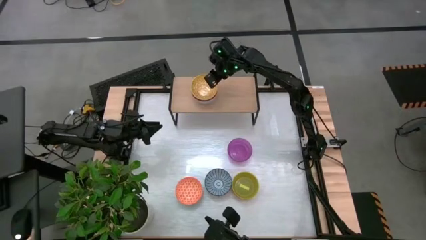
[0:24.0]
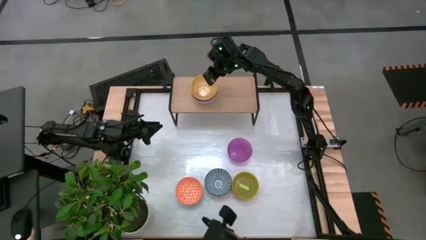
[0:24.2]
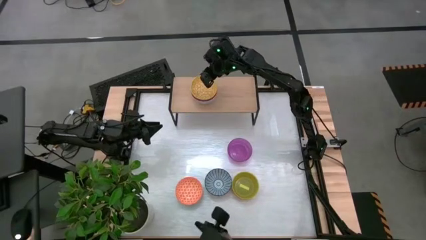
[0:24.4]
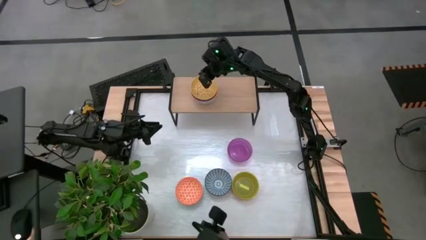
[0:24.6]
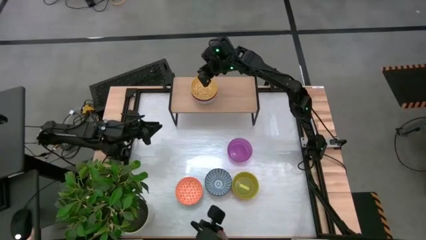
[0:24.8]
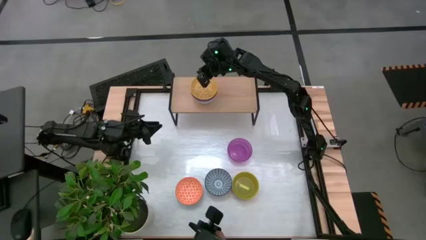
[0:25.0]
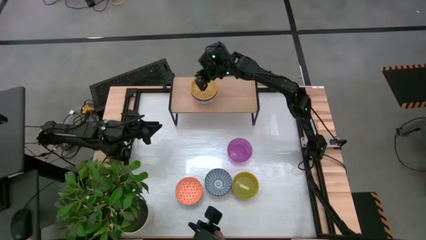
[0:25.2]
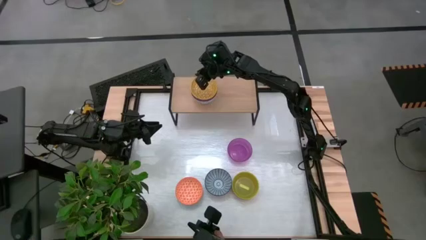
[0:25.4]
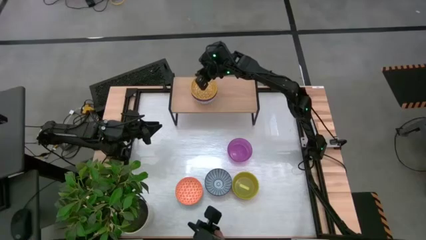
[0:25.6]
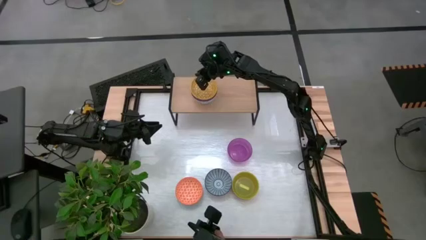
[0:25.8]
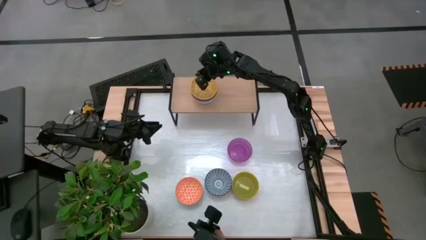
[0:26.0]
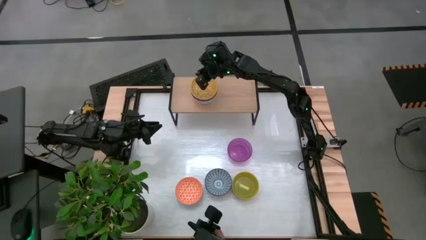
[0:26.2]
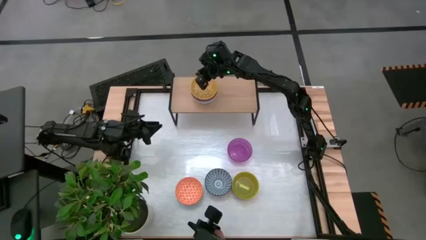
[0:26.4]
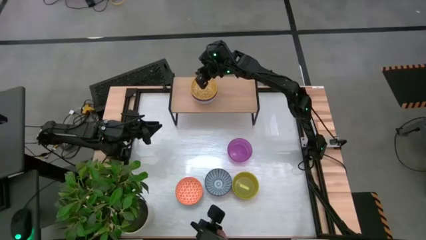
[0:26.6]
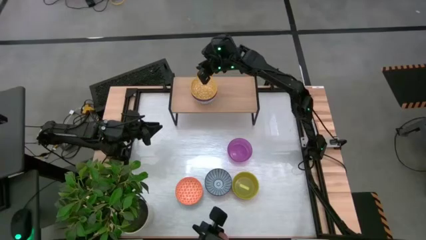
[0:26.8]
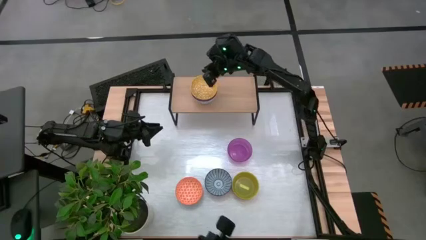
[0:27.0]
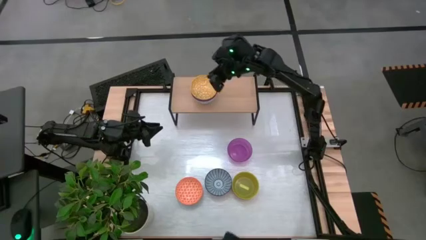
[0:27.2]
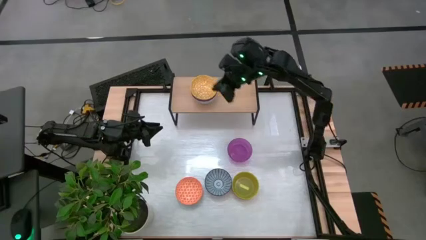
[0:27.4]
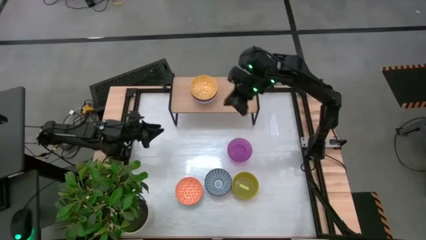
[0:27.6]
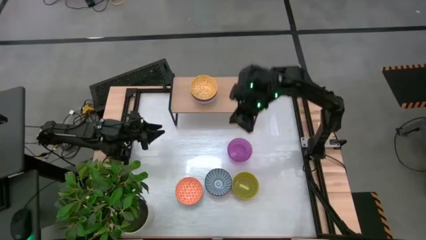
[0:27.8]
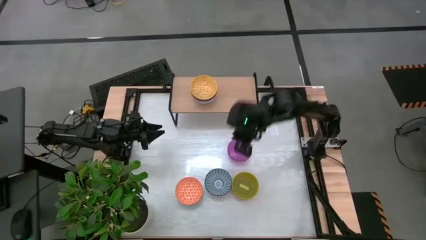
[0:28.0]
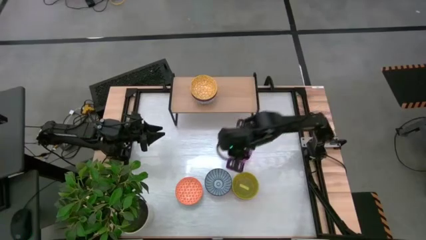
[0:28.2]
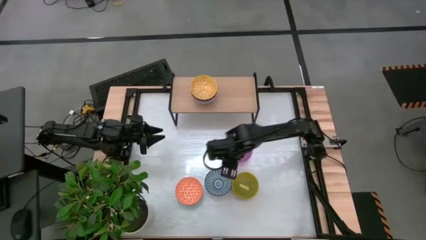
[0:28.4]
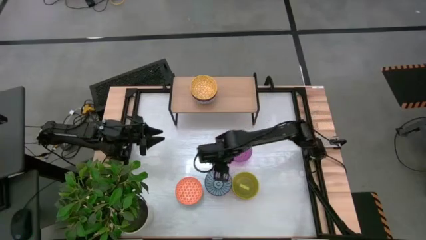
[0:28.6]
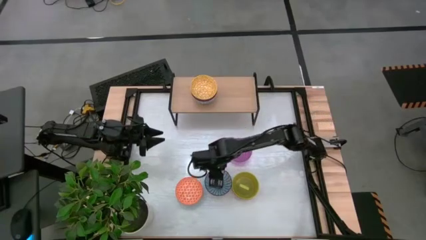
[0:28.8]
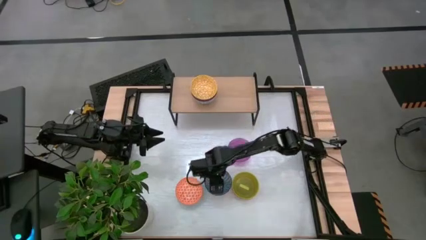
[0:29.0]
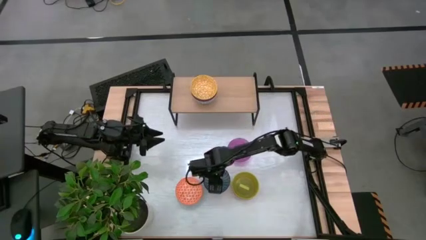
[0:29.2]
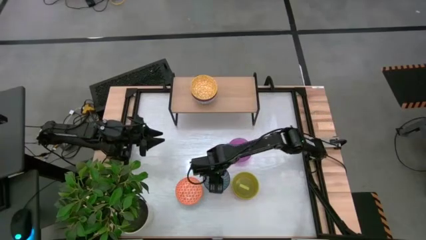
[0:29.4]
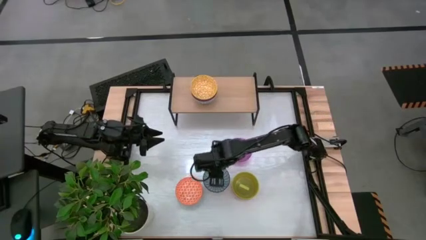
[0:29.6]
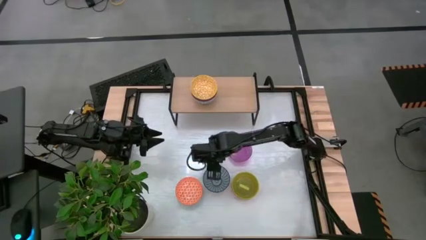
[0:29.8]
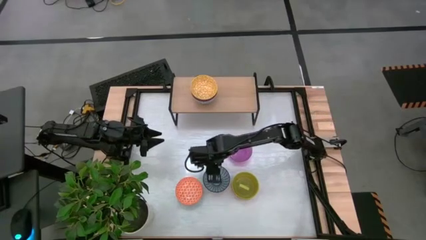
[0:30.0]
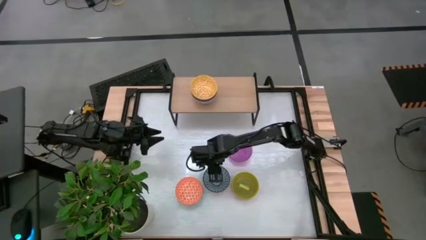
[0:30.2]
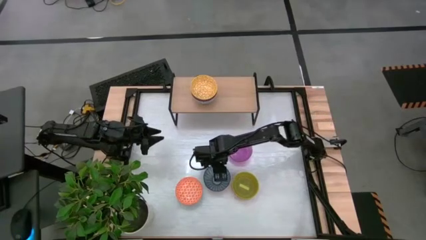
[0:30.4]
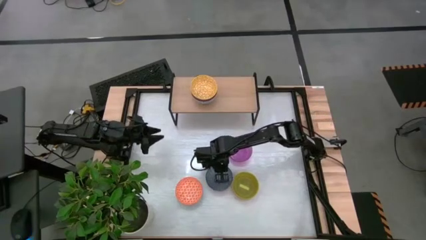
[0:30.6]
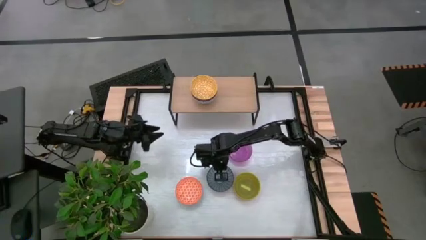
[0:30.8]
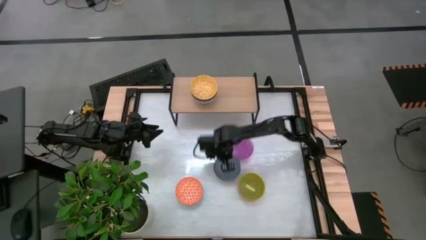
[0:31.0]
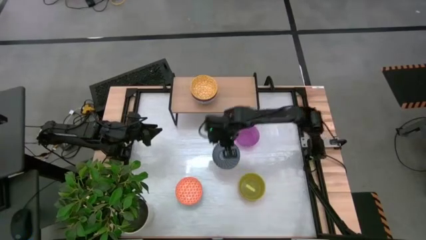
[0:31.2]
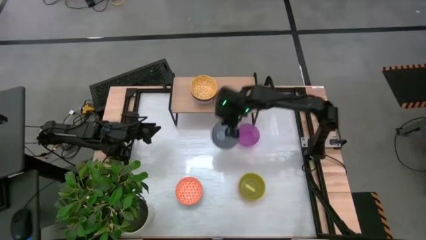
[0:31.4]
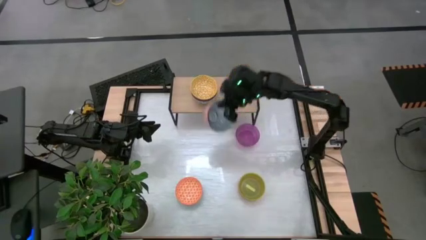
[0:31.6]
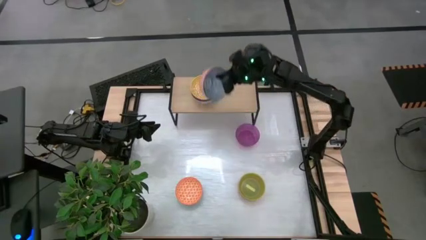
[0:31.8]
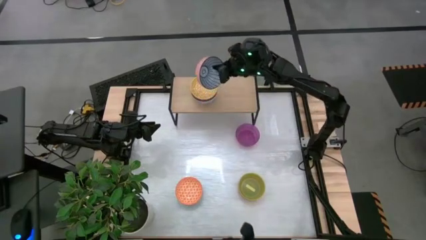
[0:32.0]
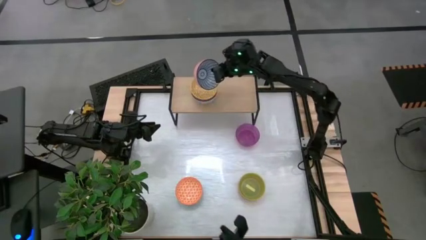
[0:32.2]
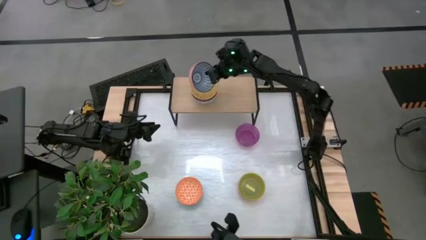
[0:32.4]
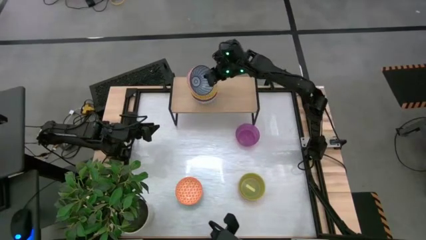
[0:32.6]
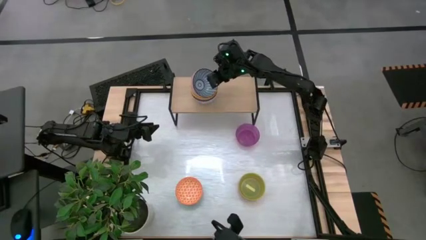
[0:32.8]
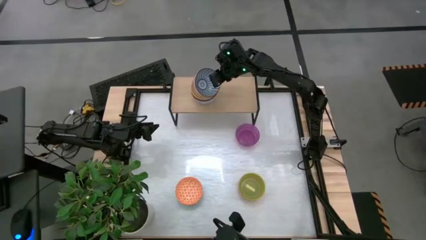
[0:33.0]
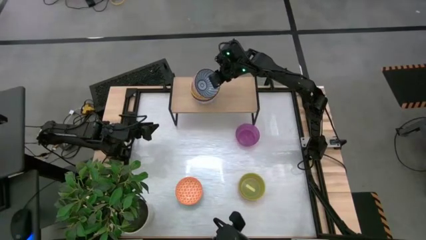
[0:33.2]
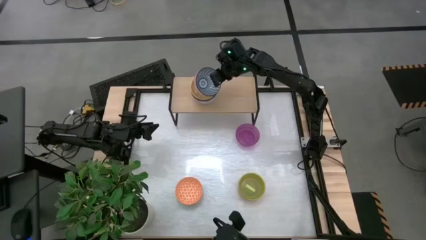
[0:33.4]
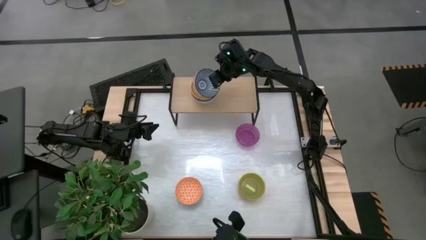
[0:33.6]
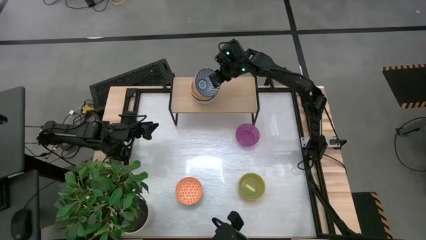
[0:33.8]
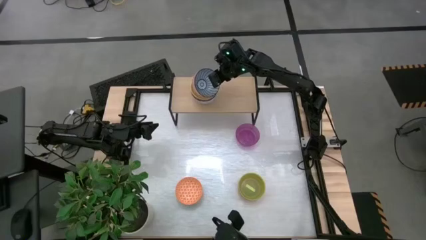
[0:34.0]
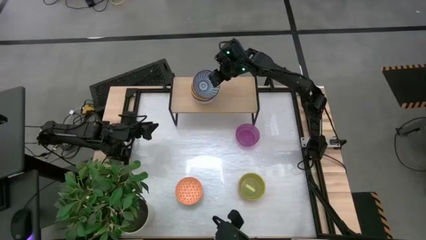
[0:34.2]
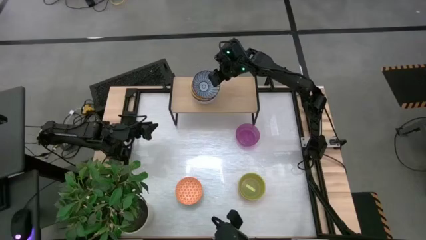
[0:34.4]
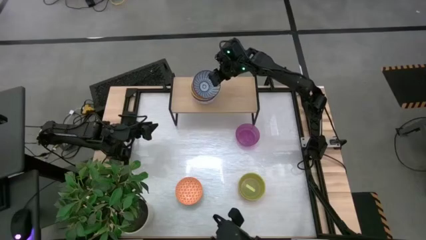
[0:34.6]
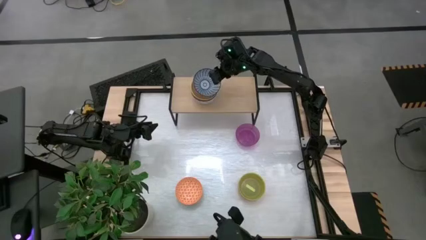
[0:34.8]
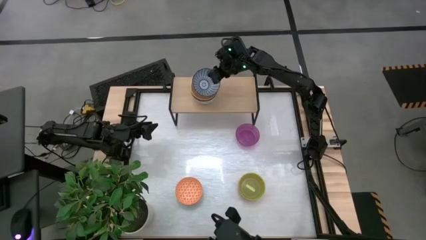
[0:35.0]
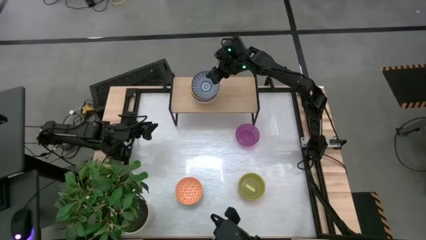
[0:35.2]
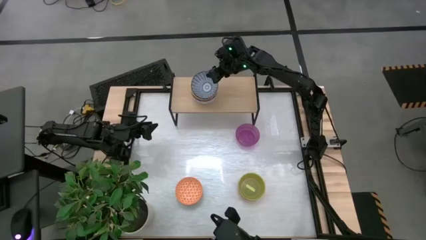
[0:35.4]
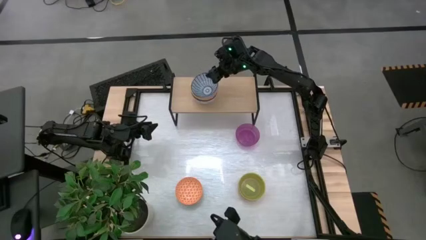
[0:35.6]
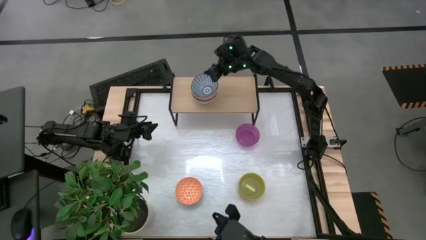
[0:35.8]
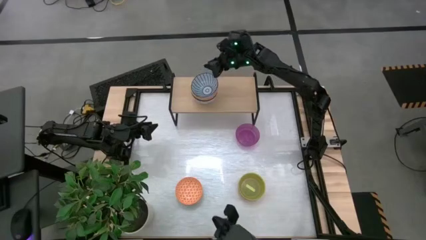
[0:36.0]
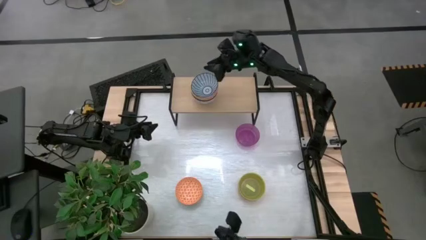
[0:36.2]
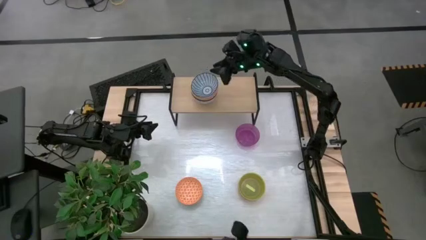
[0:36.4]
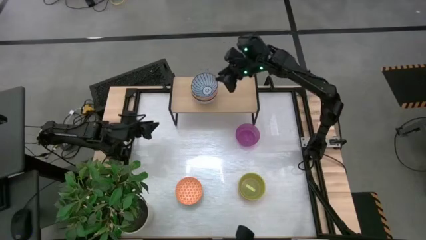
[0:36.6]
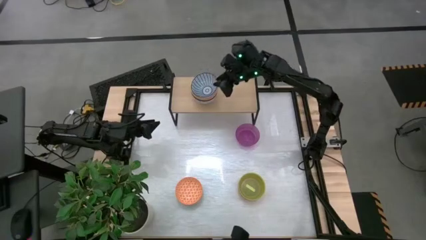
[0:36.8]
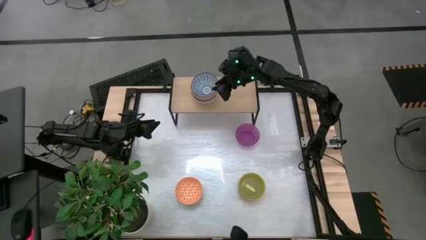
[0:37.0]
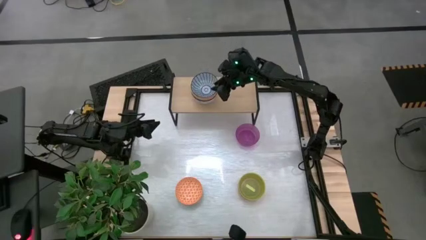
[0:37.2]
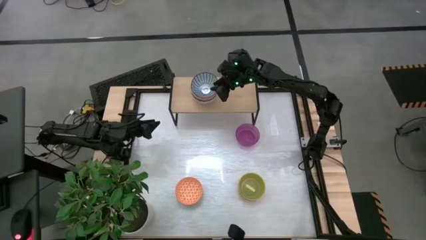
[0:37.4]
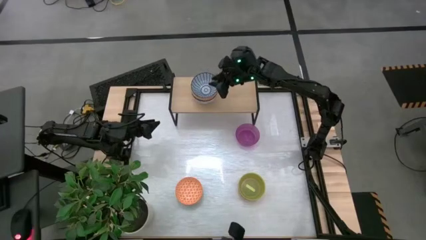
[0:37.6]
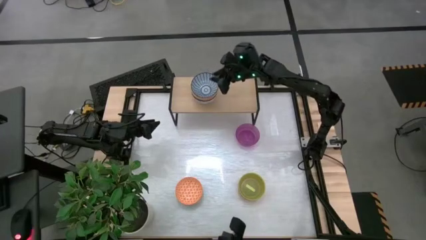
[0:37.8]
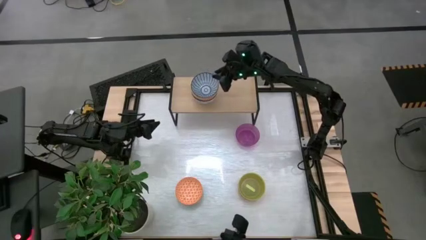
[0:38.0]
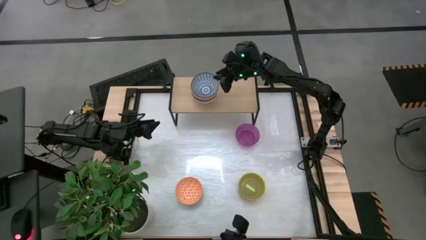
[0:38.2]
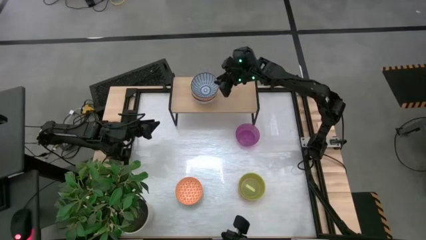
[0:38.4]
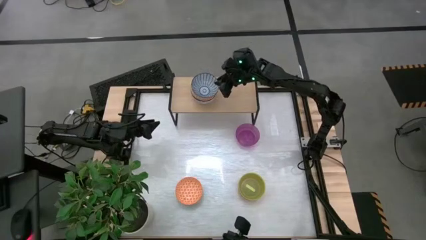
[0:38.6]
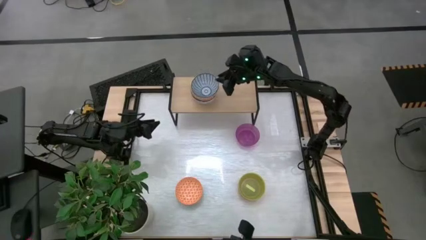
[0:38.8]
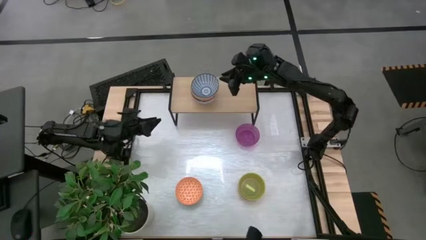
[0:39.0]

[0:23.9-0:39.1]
Task: Place and stack bowls onto a shelf
Stack the blue patterned bowl on top of the yellow patterned bowl on the shelf
